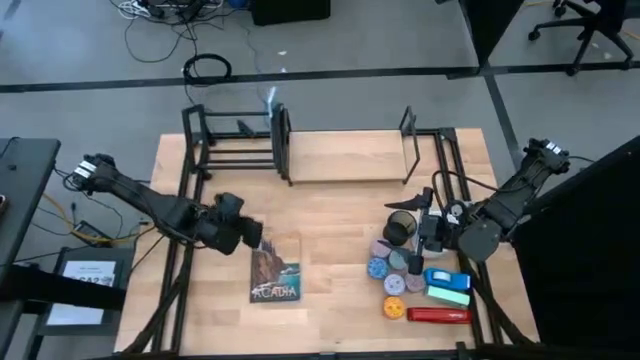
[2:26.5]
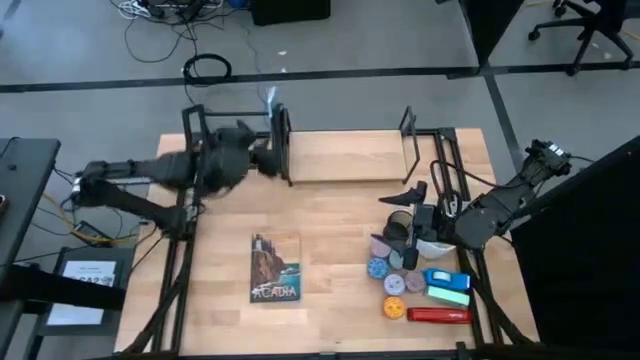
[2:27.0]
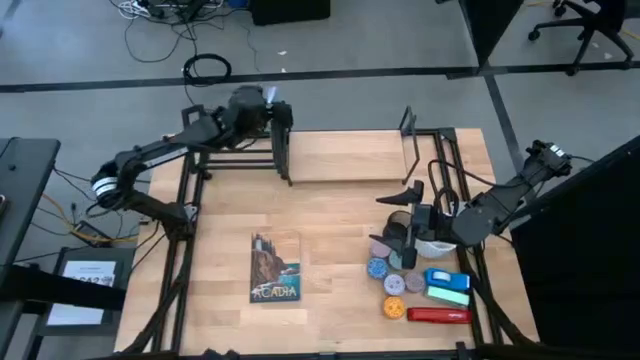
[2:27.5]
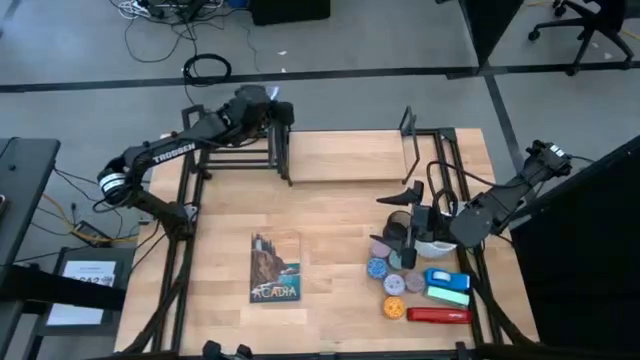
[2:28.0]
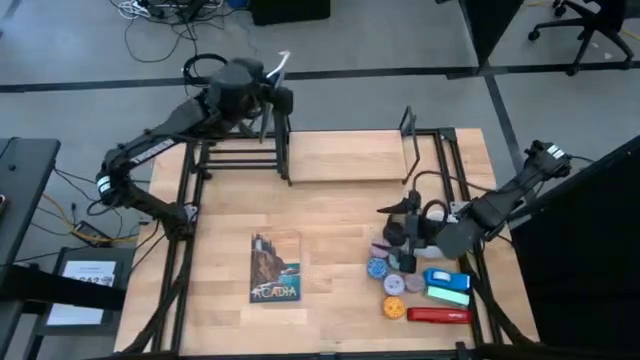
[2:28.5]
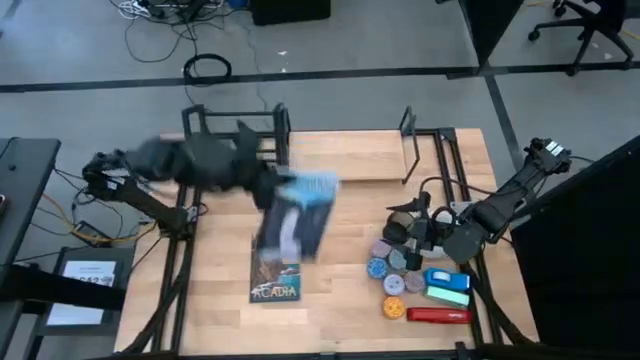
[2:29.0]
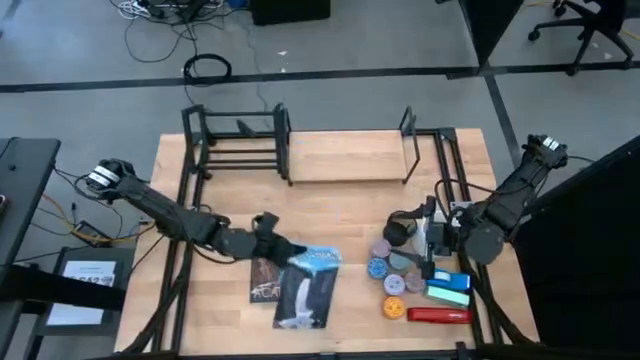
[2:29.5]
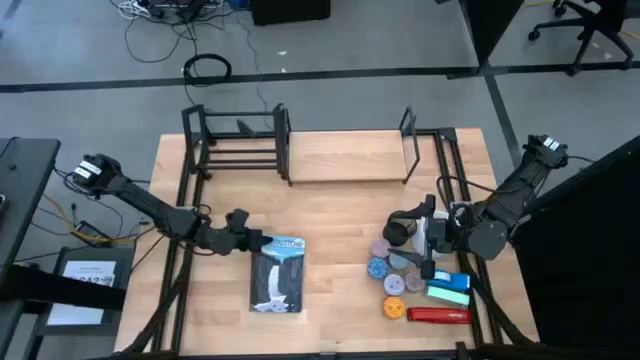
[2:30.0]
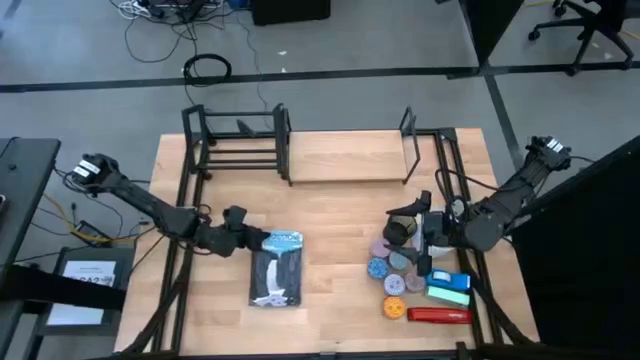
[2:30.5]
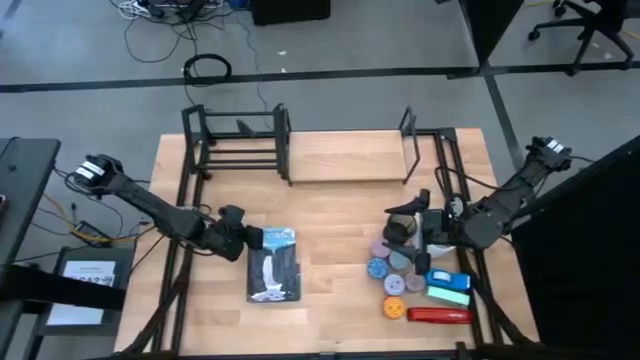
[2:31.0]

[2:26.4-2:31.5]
Task: Stock shelves
Remove the blue book from the bookshelf

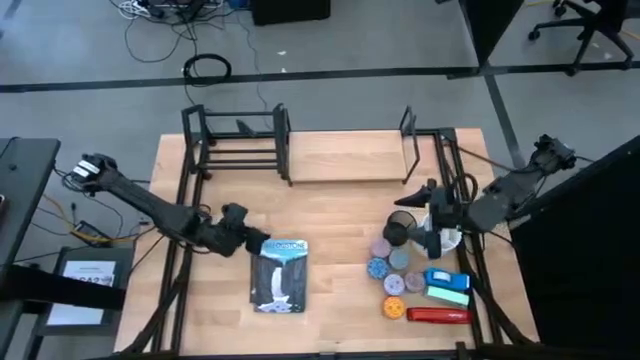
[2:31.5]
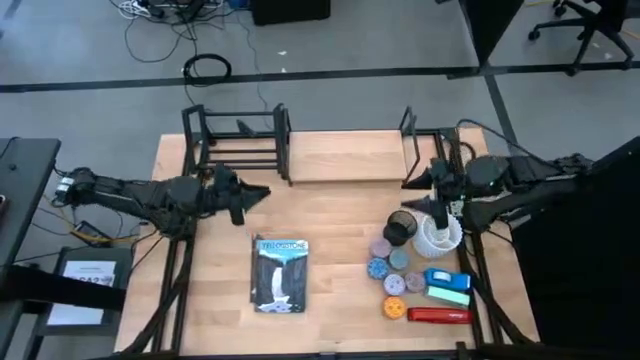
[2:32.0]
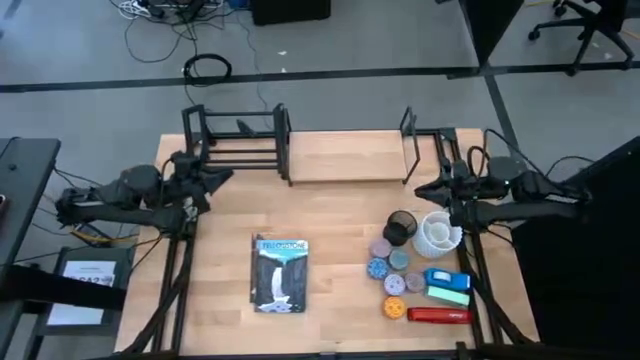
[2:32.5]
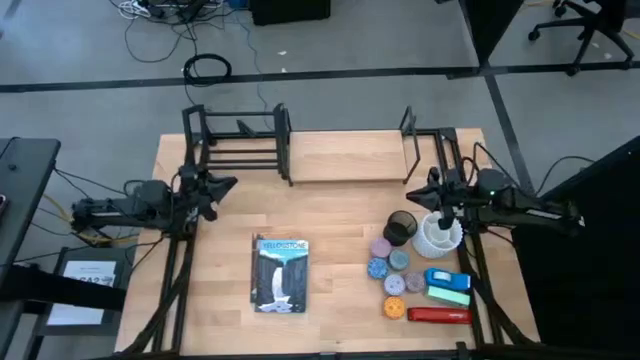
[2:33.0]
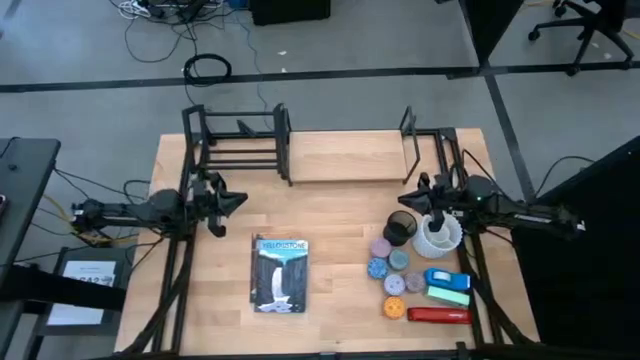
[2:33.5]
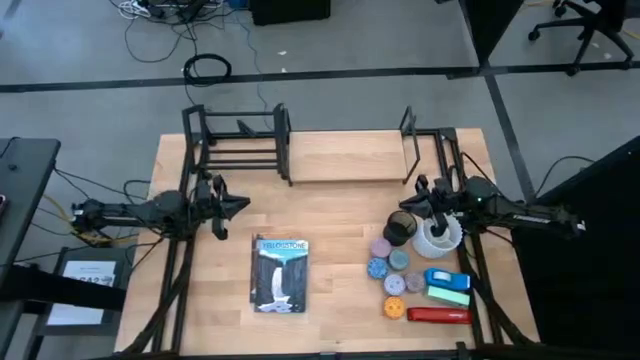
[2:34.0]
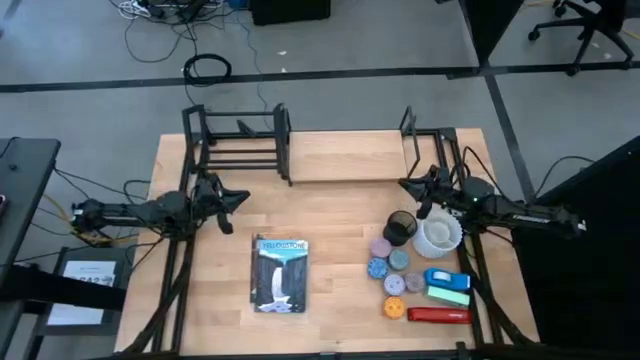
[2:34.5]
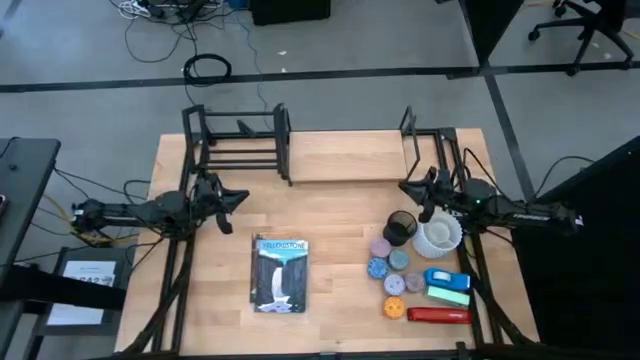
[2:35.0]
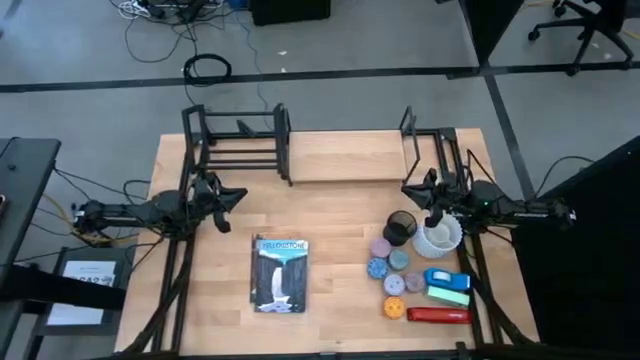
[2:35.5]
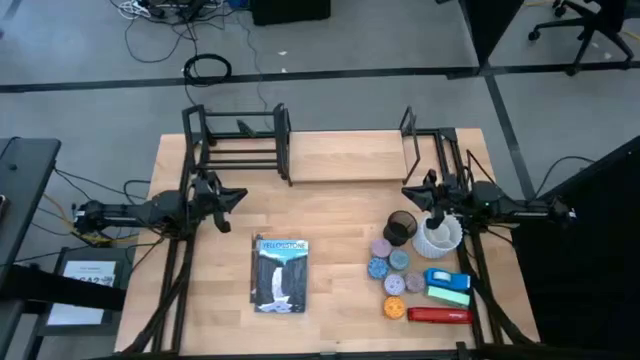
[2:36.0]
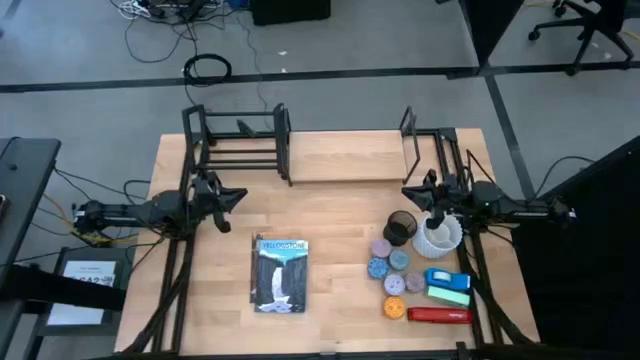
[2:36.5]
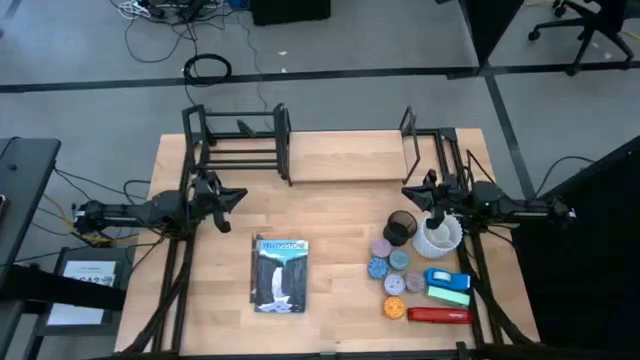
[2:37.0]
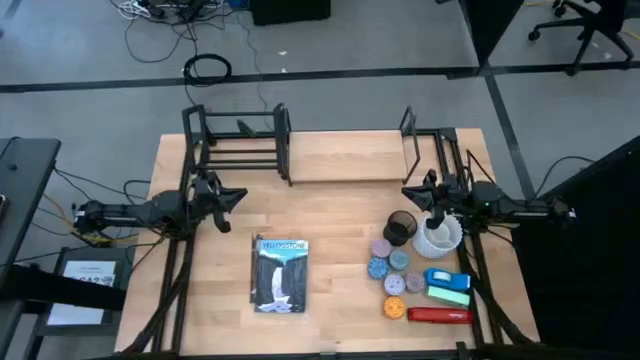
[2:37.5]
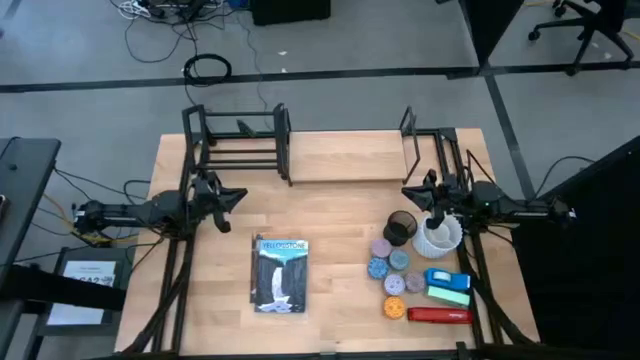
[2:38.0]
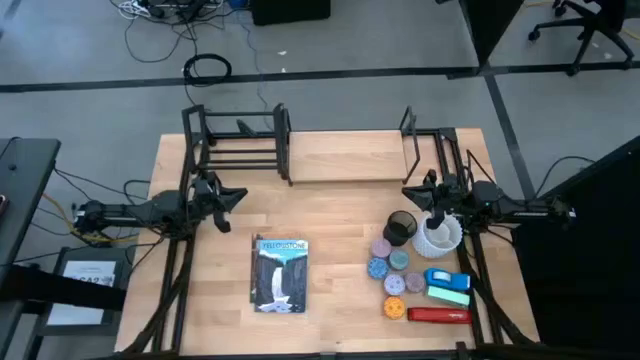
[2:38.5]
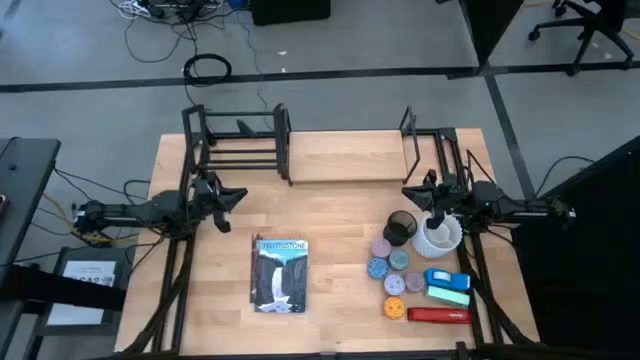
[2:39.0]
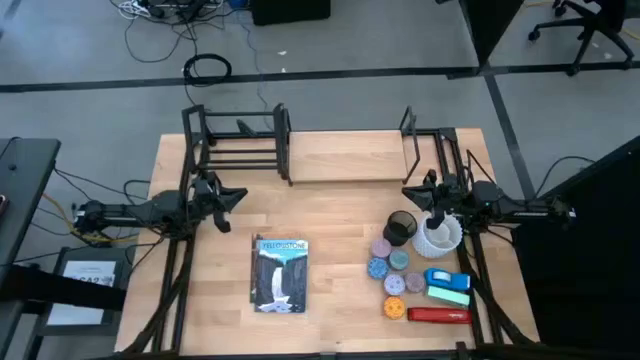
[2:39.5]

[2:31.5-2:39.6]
Return to Home Position

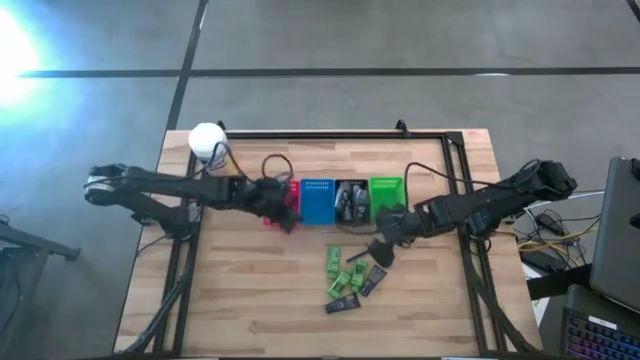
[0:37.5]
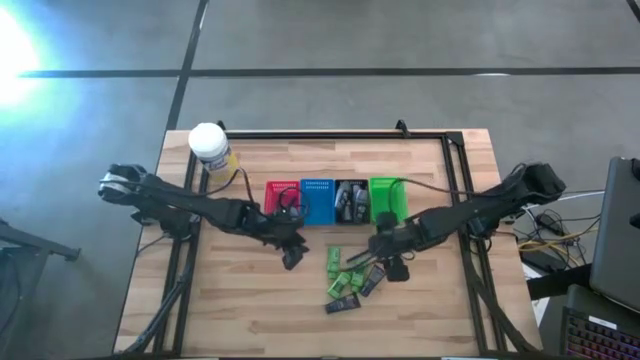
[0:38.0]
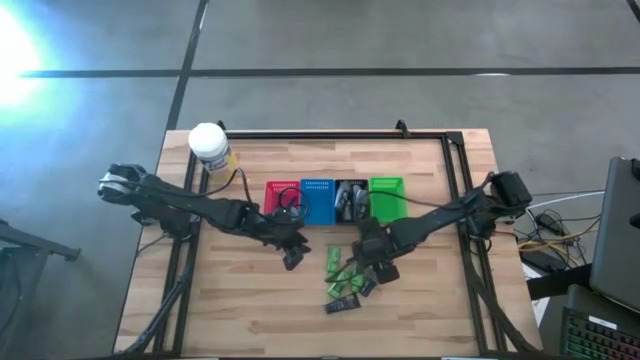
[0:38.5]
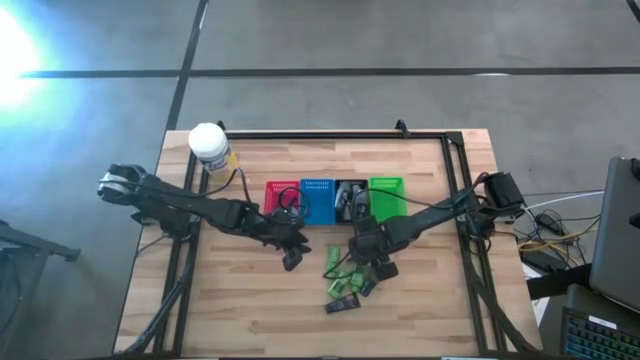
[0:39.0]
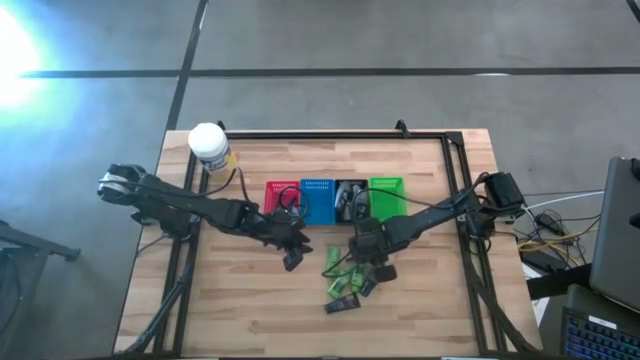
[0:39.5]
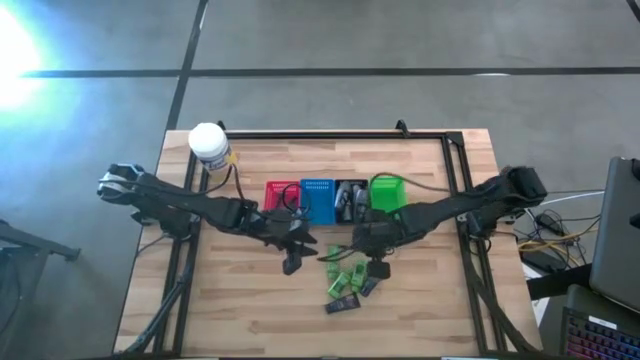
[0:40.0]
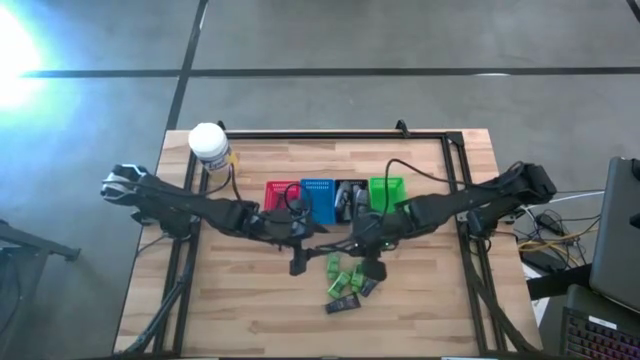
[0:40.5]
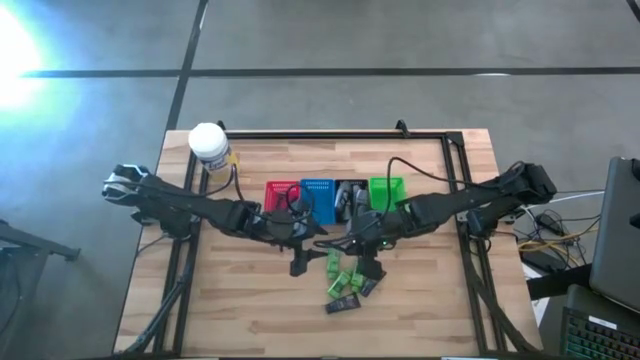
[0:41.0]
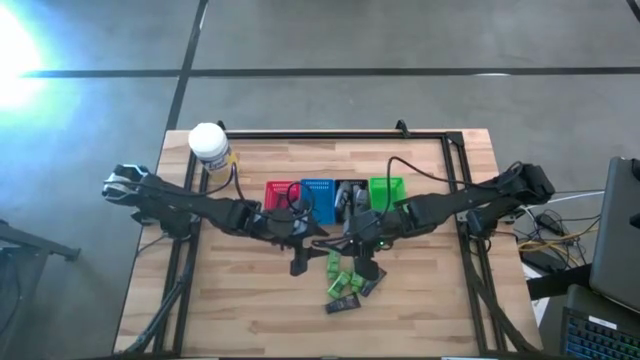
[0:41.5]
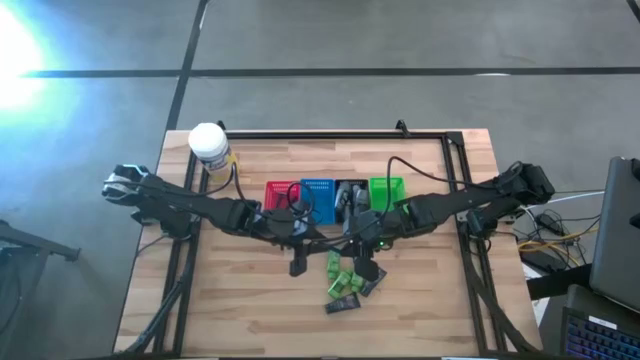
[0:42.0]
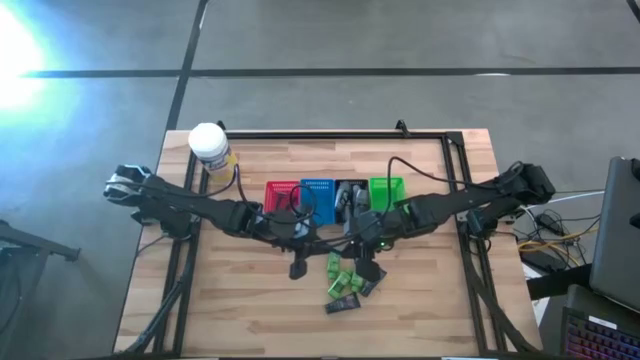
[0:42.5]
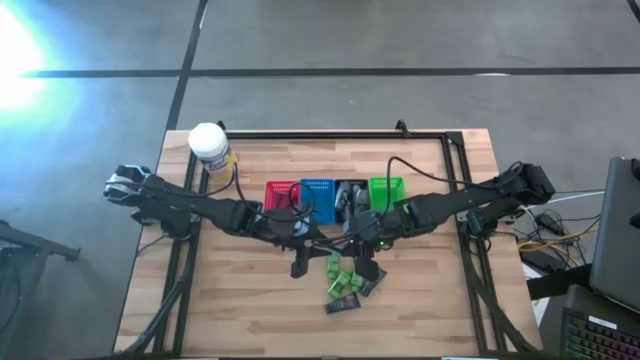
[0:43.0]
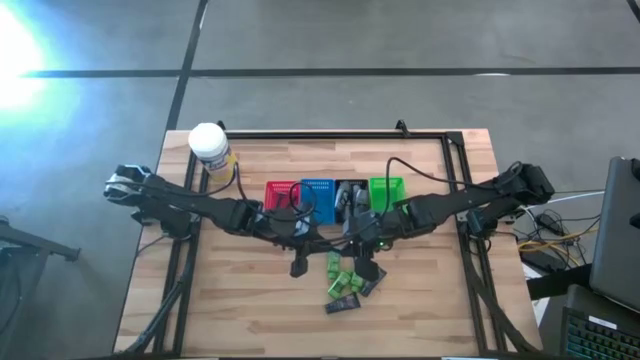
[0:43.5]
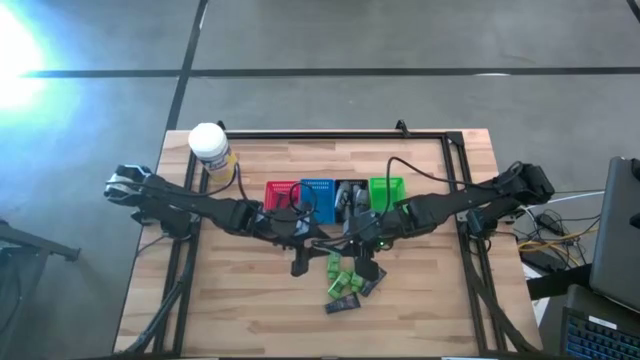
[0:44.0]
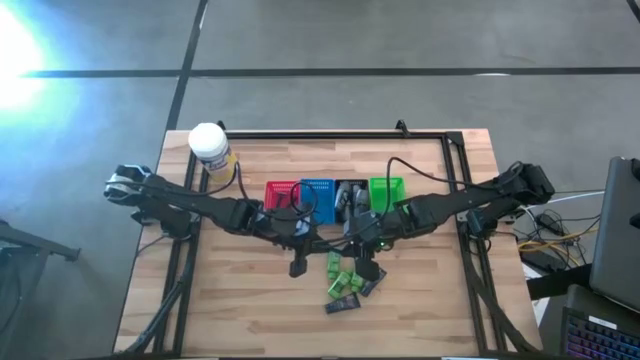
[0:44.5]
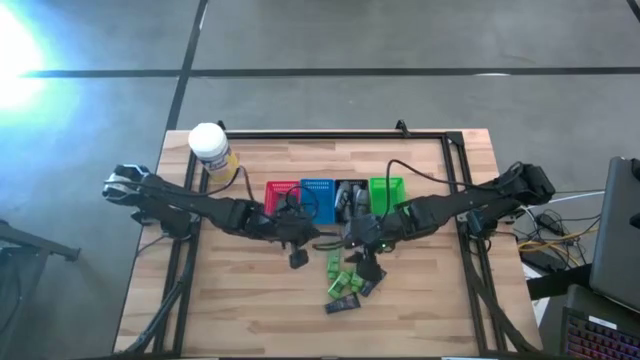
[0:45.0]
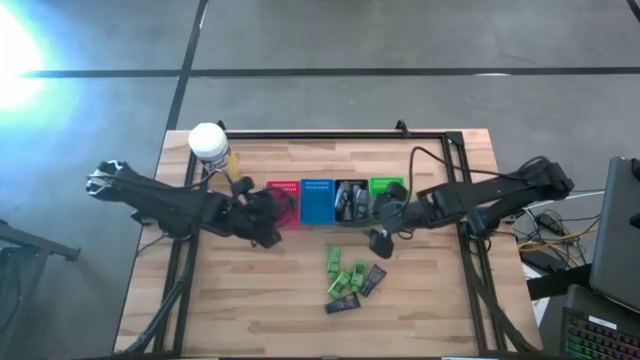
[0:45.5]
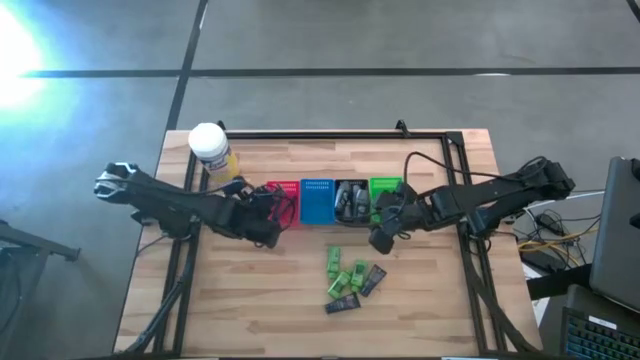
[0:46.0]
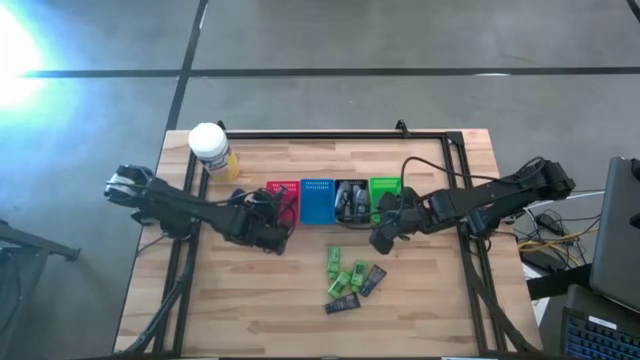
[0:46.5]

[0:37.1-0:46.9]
Task: Pick & Place Travel size toiletries
Put the blue razor into the red bin
